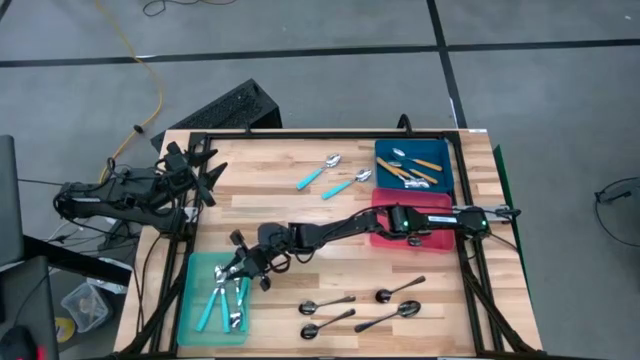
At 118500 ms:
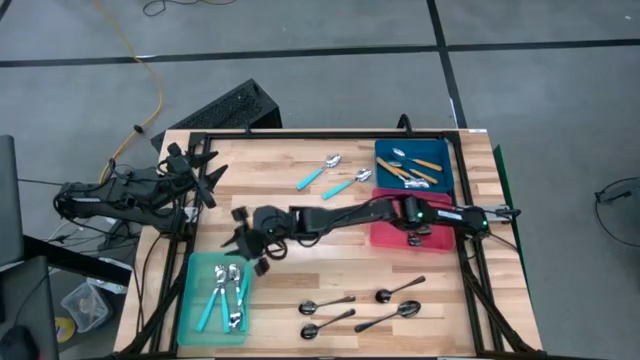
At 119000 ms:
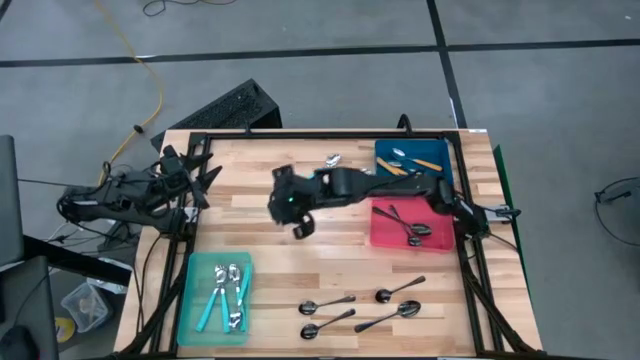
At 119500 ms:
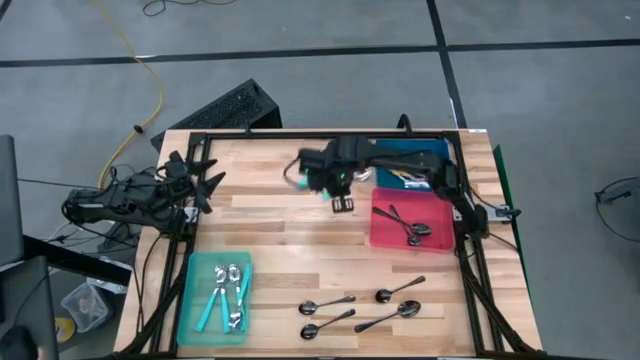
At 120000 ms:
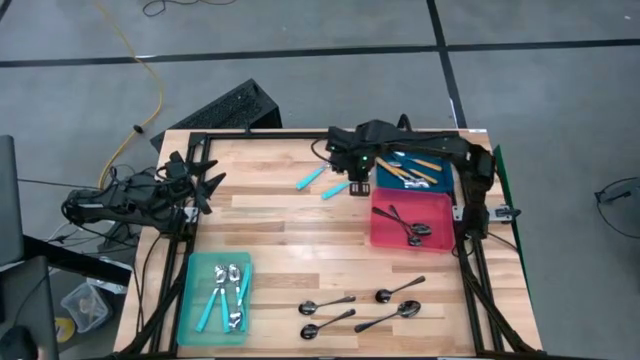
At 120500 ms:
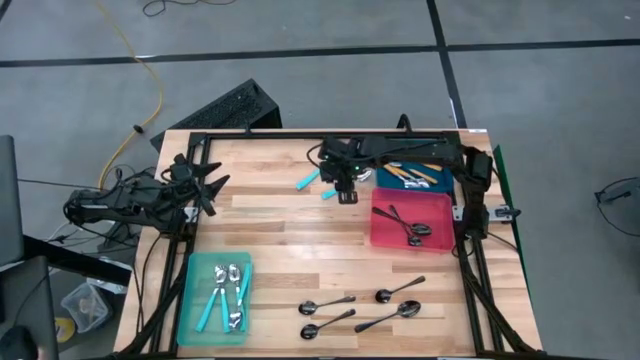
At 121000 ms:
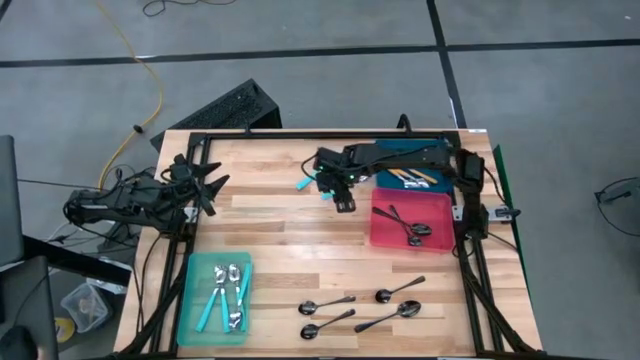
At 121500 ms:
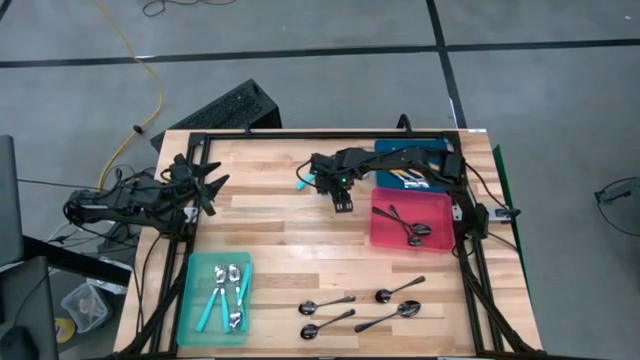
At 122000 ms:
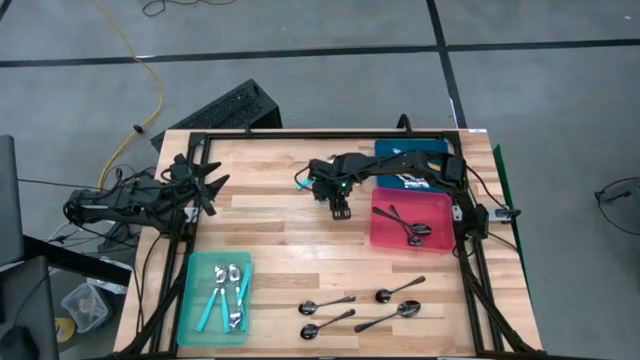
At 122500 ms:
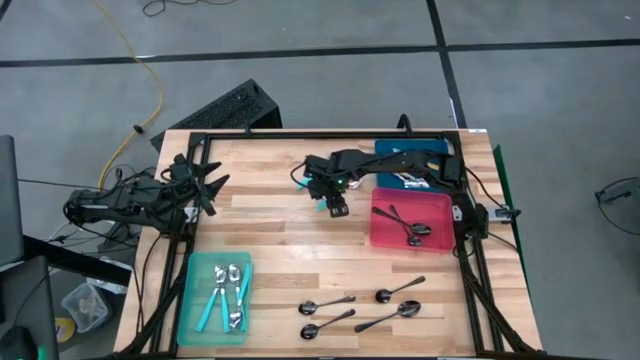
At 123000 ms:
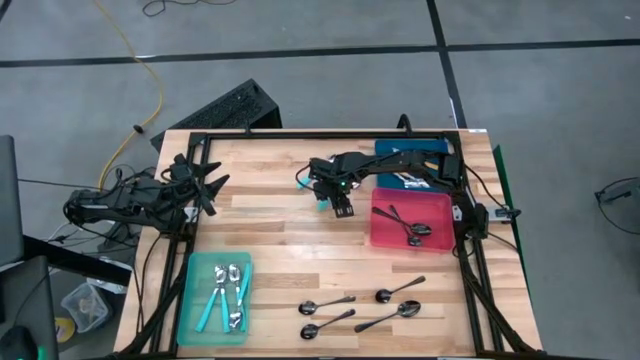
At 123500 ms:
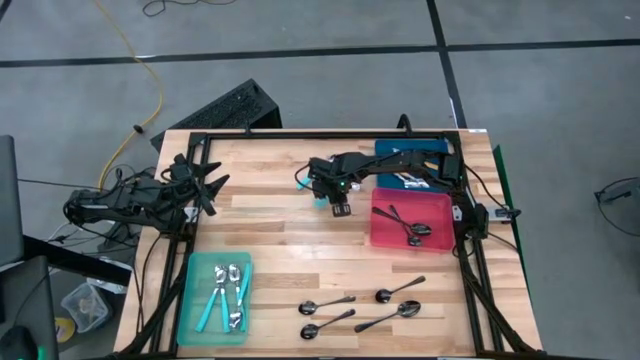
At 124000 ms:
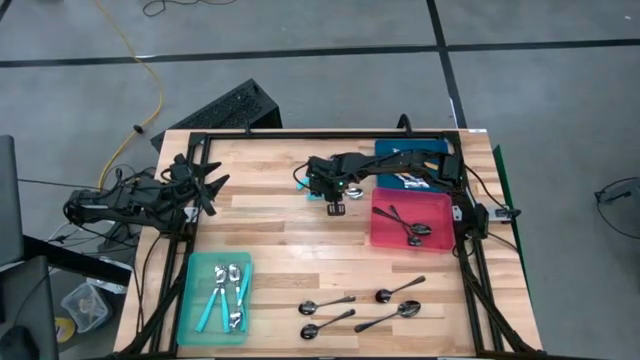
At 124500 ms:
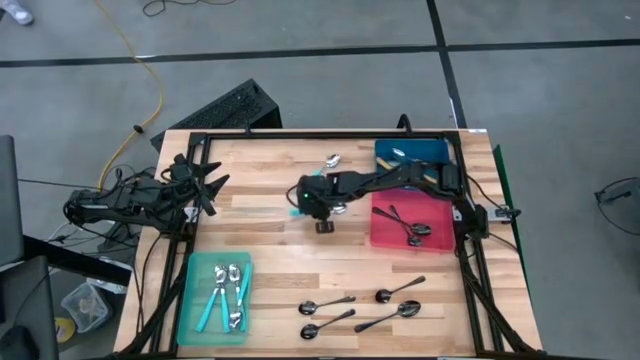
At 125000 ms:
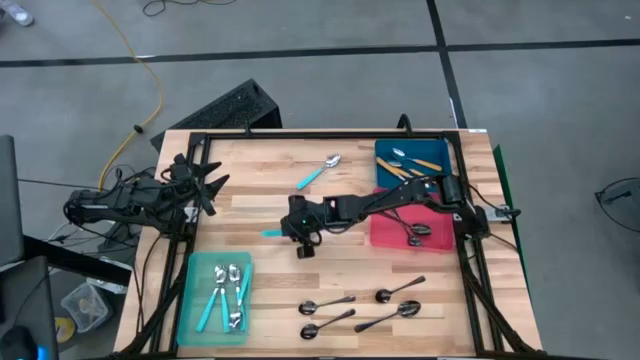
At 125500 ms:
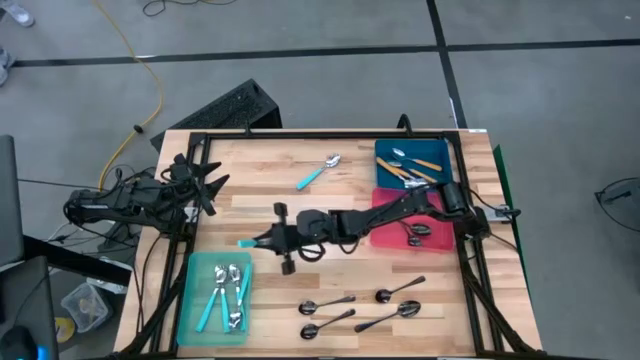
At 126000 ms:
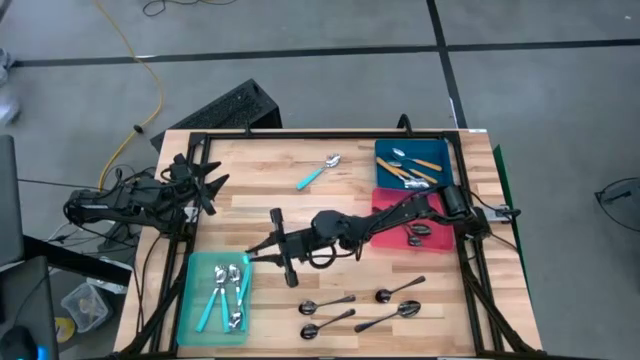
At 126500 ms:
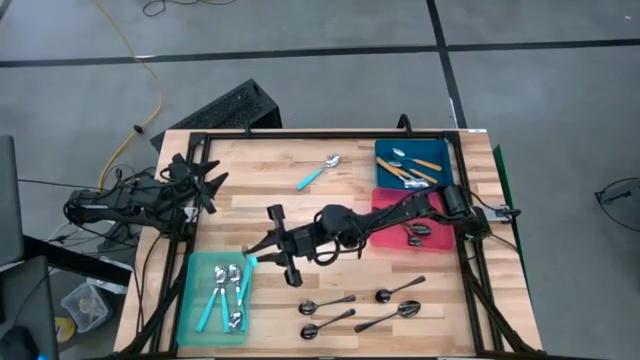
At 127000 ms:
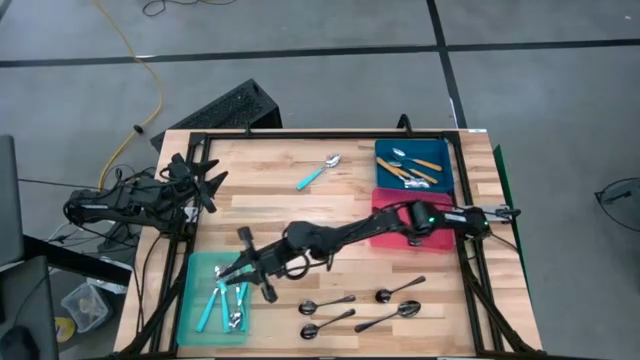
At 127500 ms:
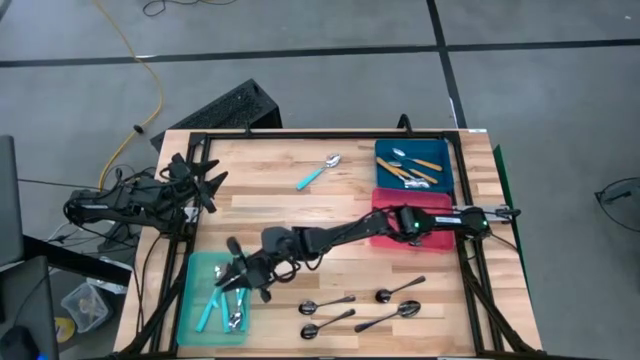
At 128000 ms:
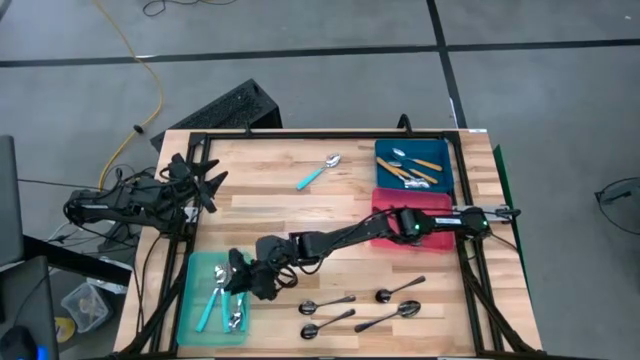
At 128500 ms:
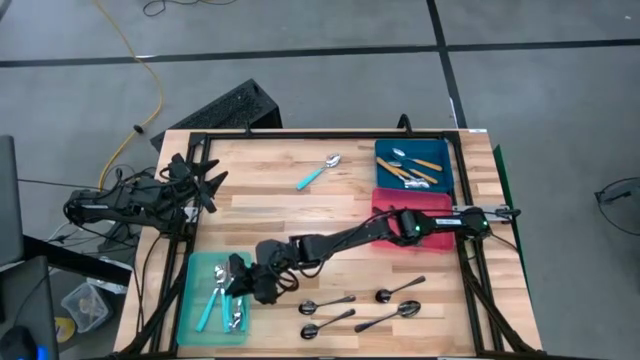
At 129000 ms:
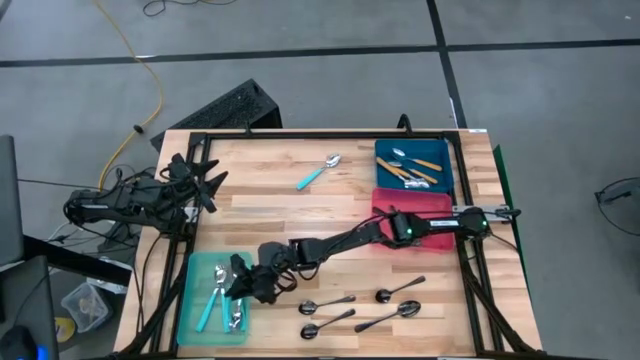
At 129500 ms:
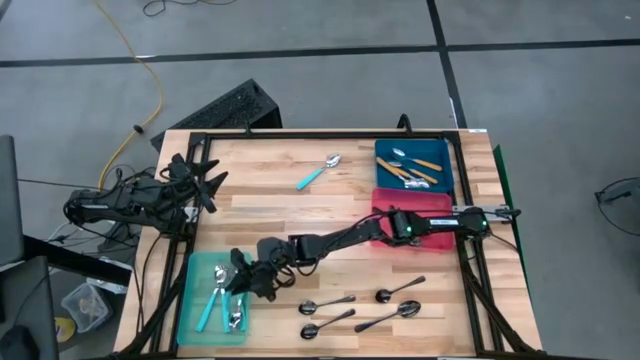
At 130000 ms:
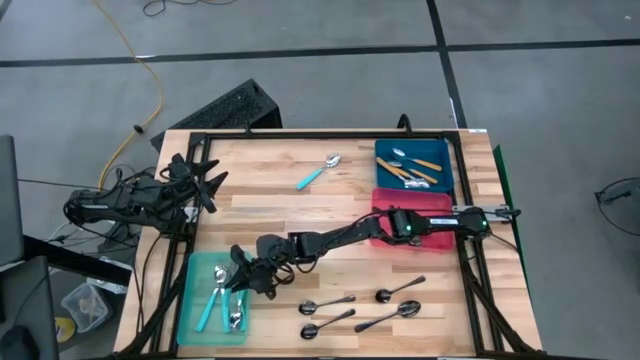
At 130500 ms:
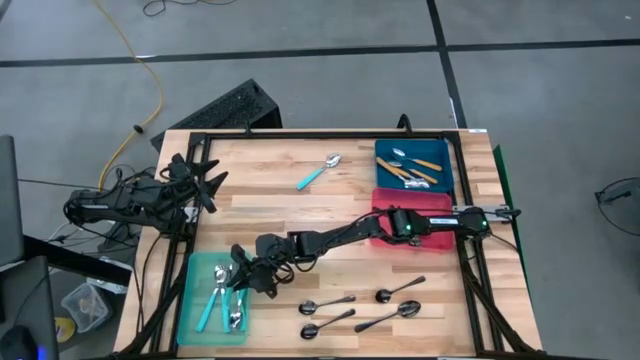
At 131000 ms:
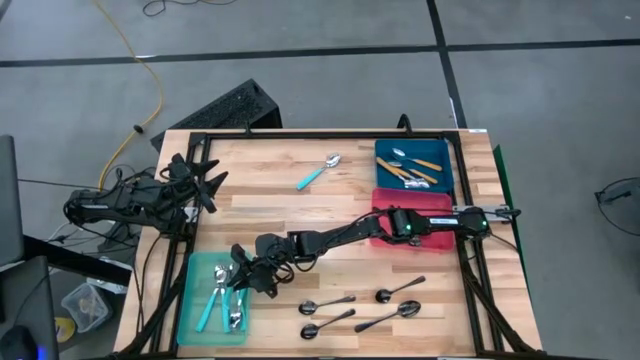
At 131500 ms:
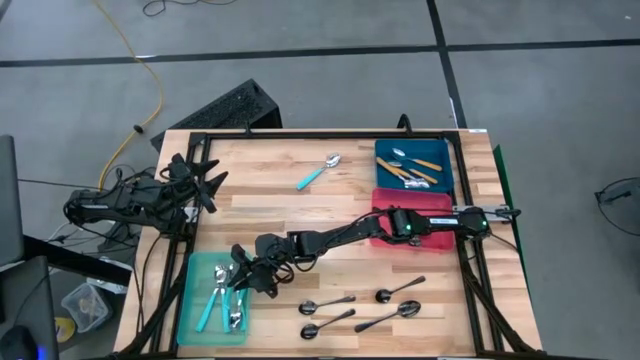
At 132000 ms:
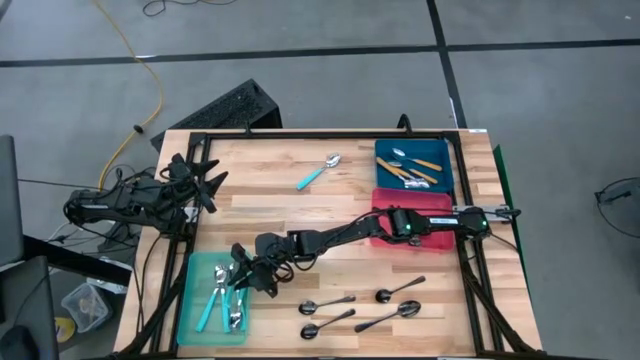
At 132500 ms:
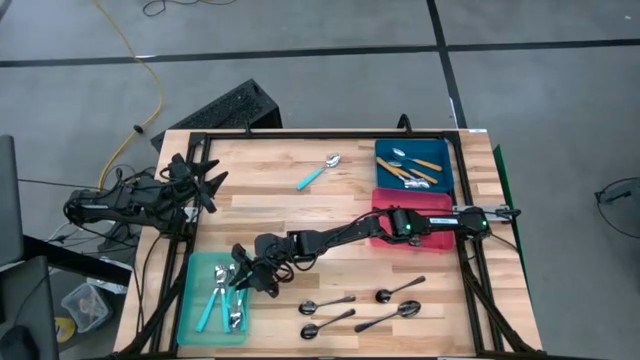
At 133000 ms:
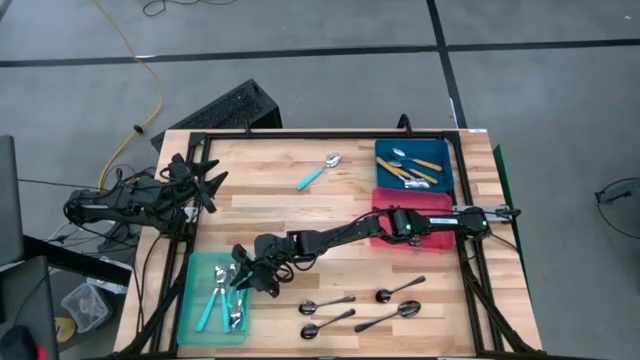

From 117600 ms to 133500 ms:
Task: Sort silverware by color (type)
Put the blue spoon into the skyblue bin

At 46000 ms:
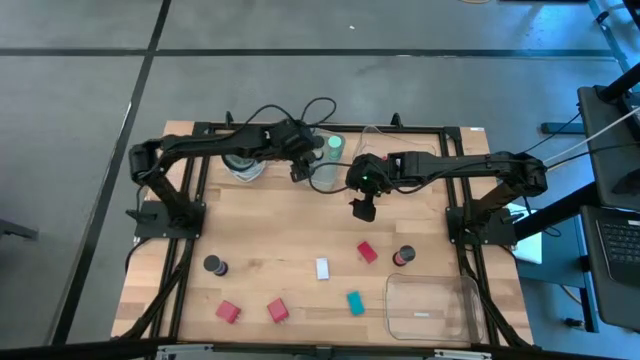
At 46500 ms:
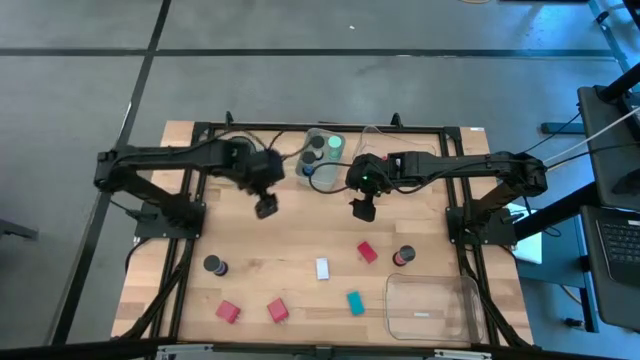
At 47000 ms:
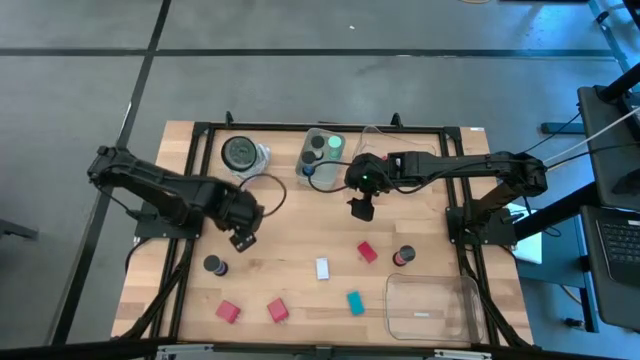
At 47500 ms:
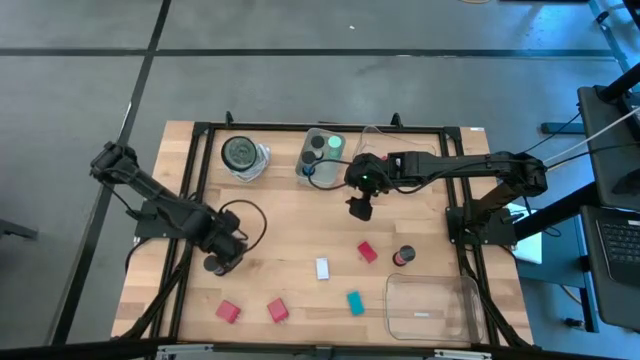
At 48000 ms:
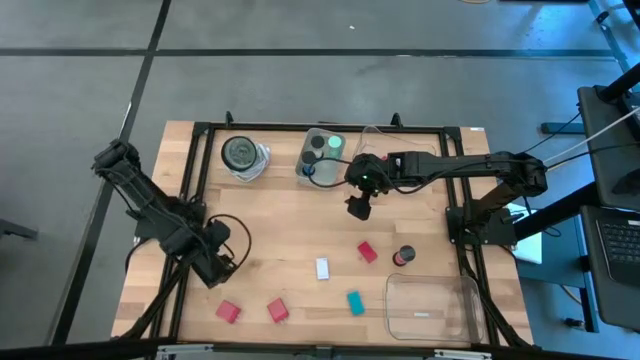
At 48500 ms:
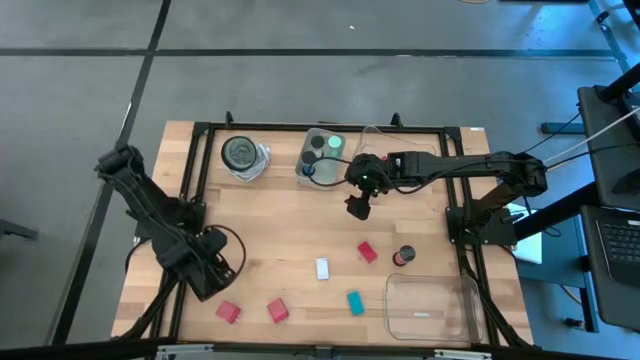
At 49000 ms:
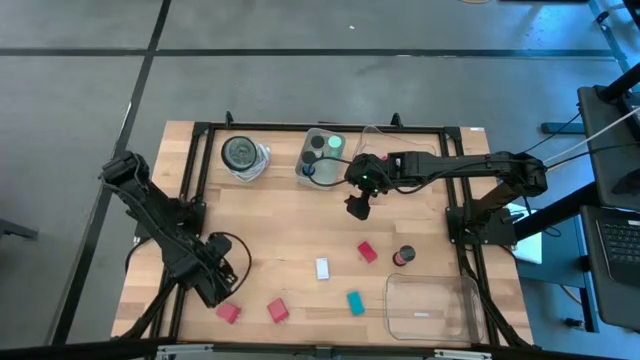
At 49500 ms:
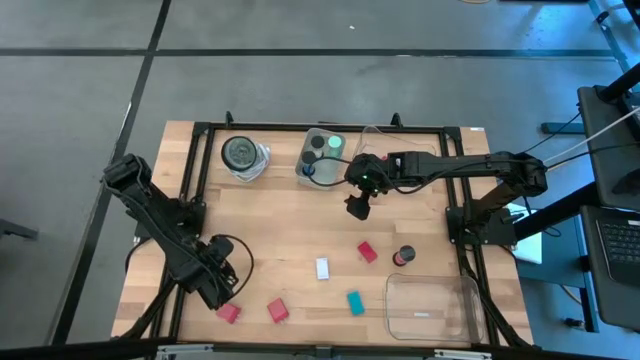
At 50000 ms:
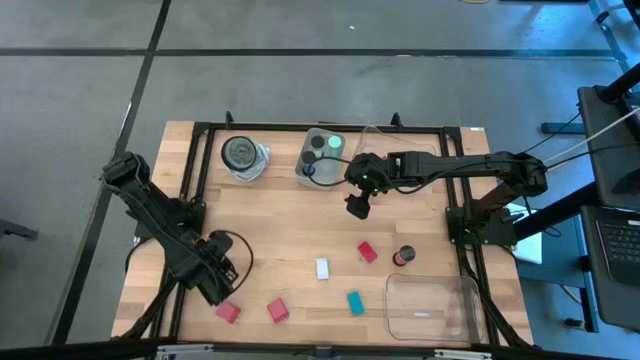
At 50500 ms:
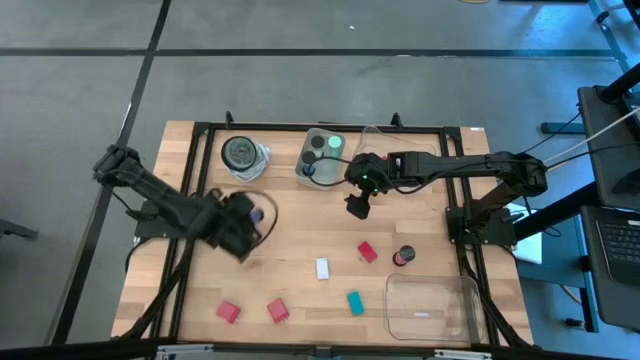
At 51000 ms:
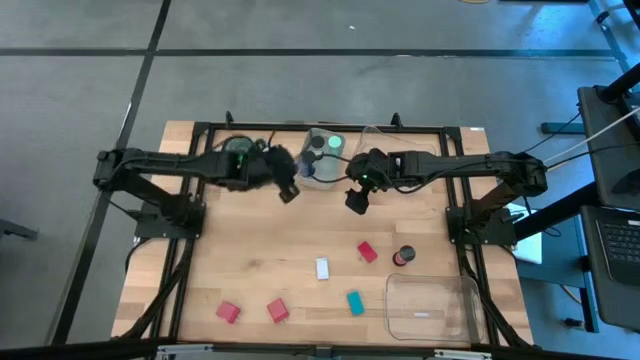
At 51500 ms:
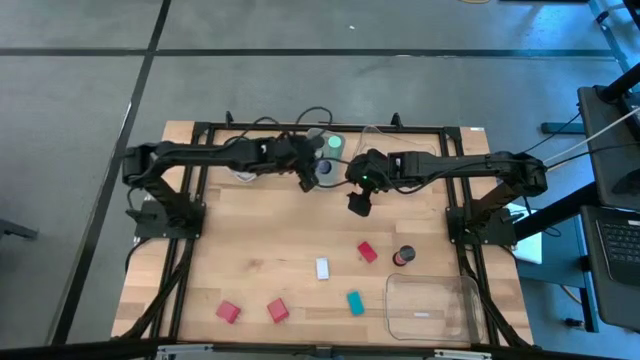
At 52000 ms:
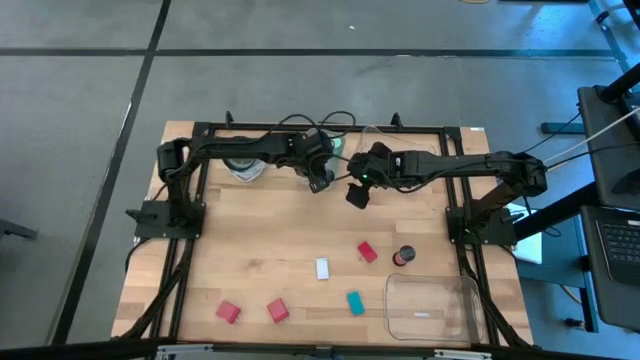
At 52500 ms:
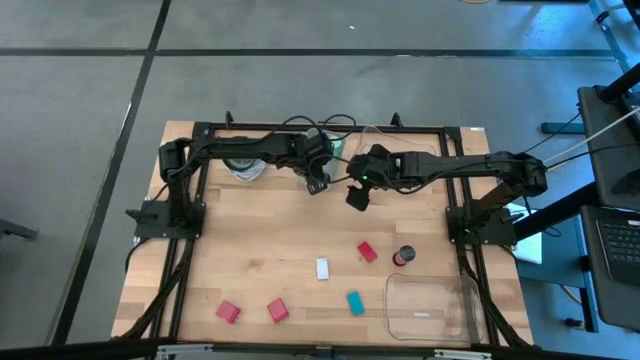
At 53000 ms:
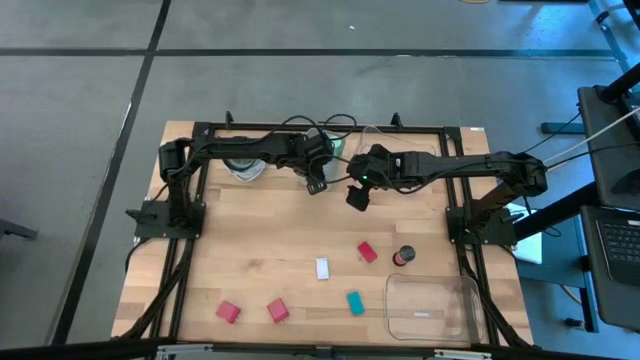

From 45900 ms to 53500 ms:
Task: Pick & Place Office items
Put the blue hourglass into the gray bin
